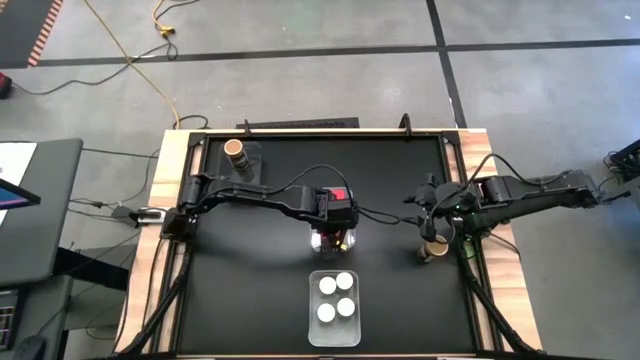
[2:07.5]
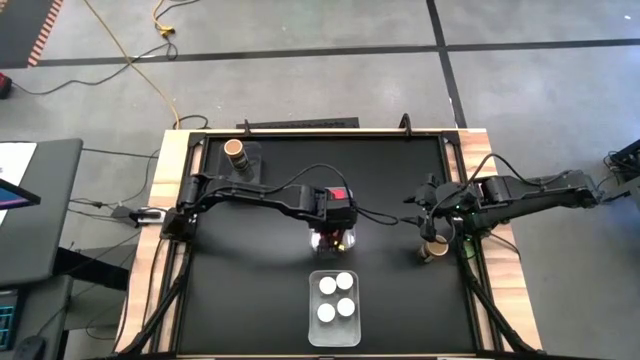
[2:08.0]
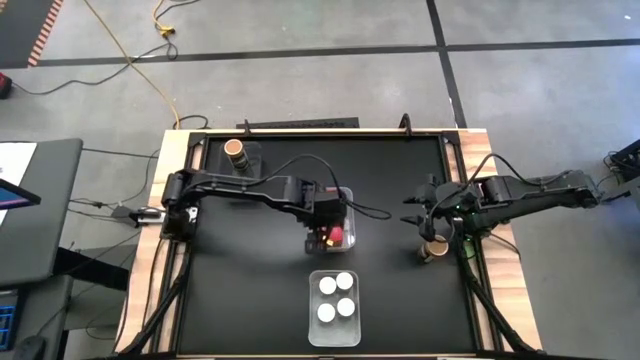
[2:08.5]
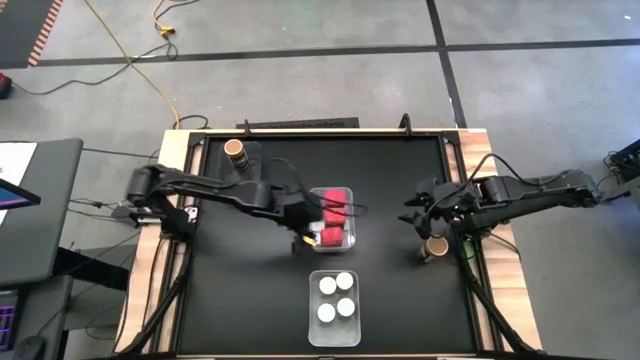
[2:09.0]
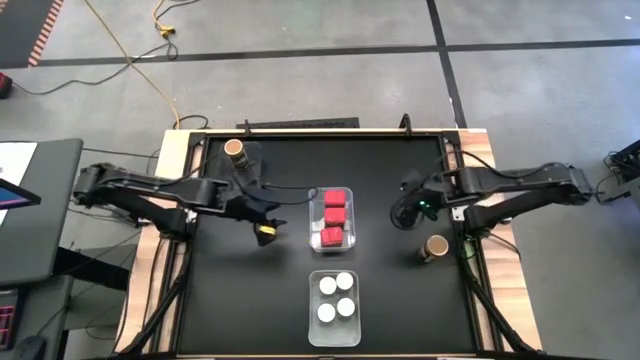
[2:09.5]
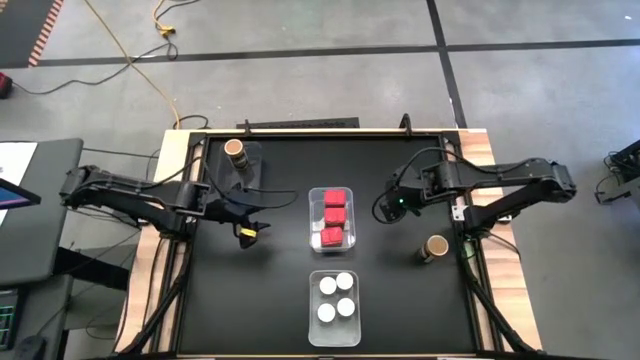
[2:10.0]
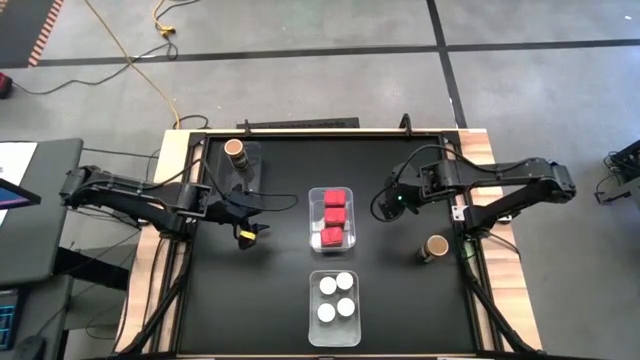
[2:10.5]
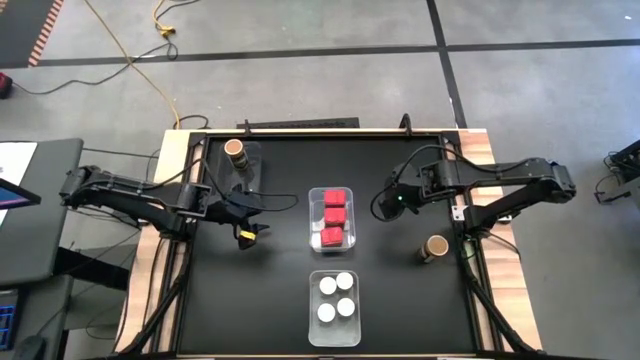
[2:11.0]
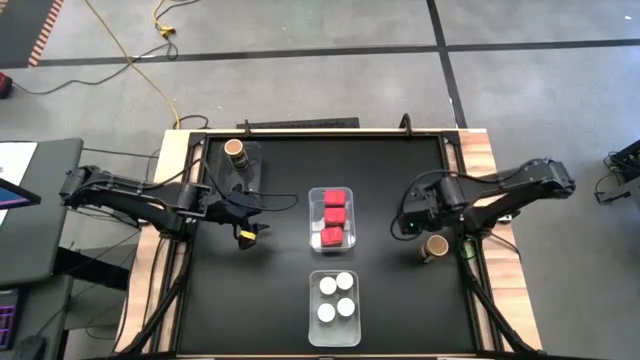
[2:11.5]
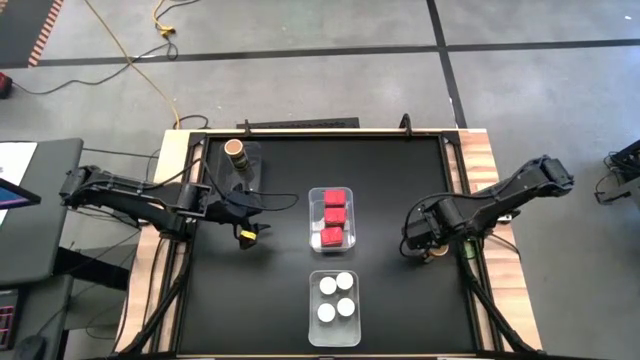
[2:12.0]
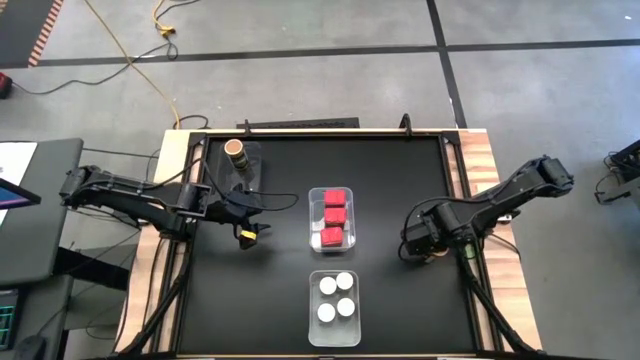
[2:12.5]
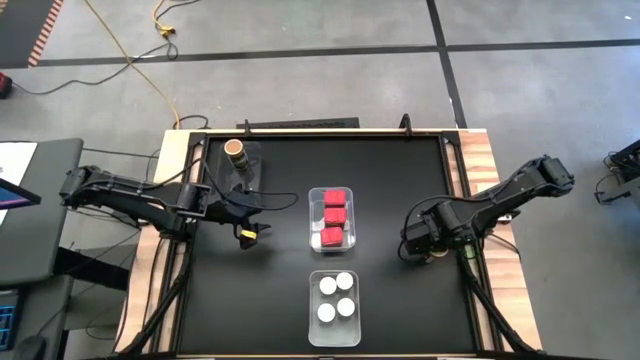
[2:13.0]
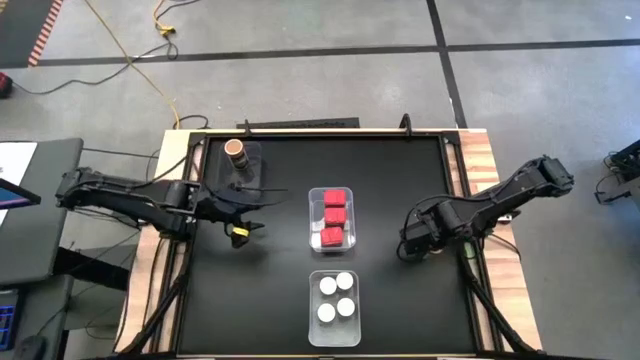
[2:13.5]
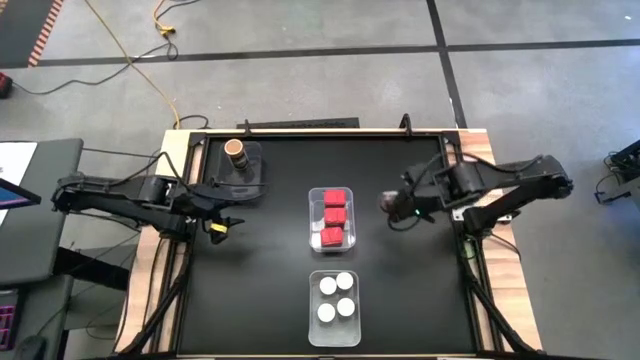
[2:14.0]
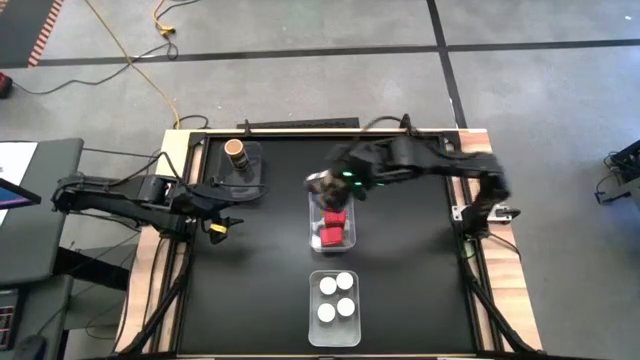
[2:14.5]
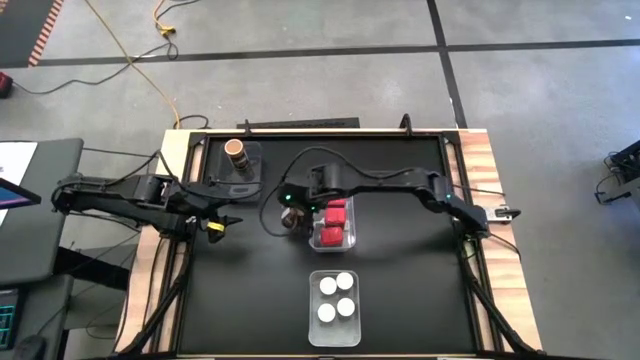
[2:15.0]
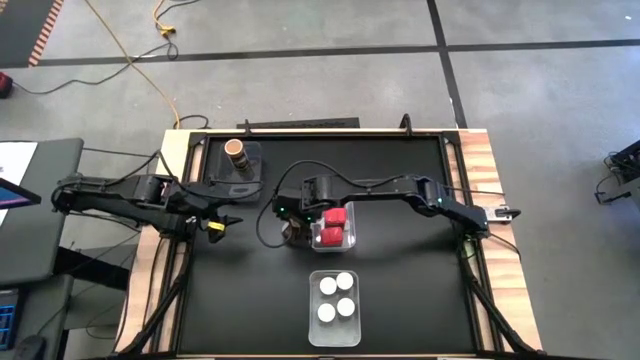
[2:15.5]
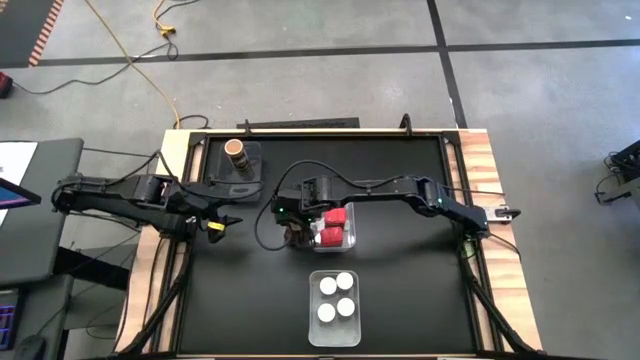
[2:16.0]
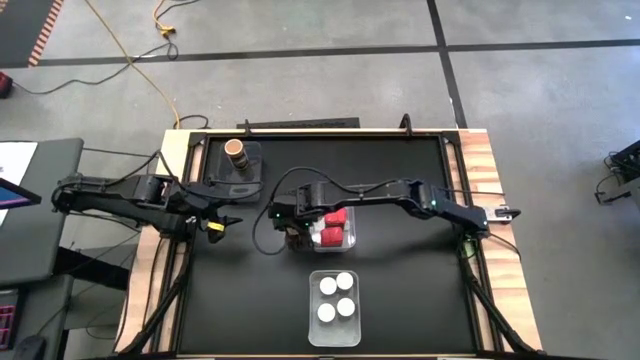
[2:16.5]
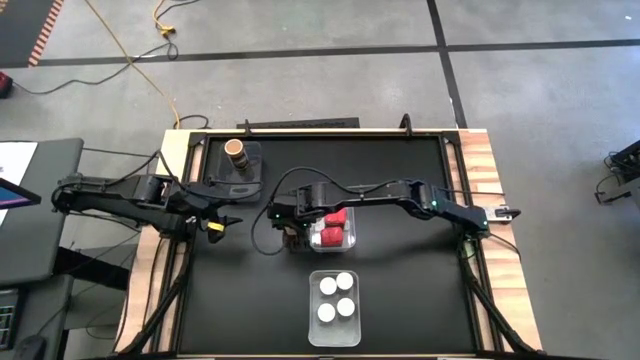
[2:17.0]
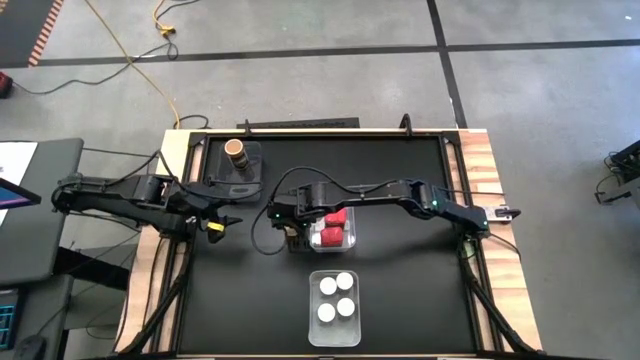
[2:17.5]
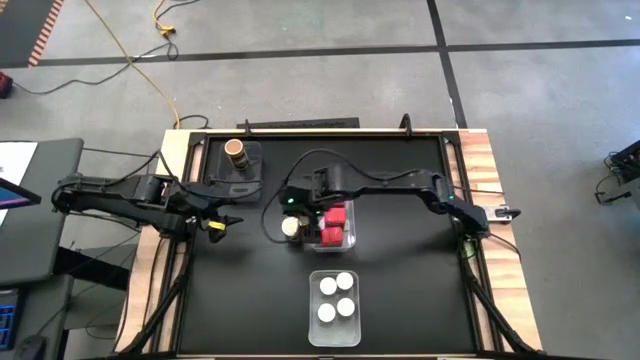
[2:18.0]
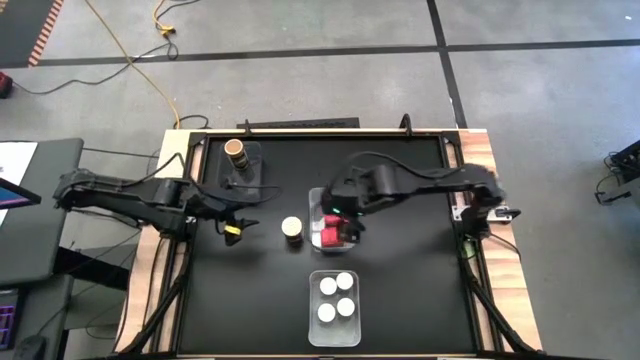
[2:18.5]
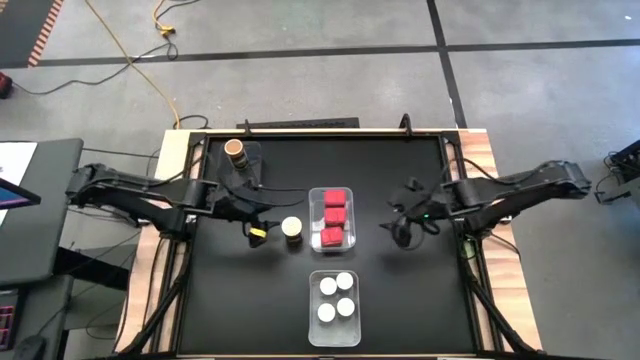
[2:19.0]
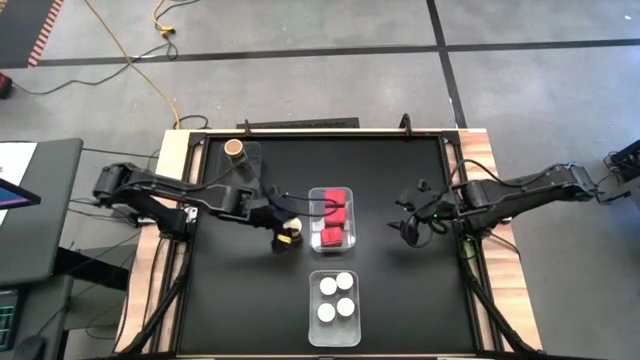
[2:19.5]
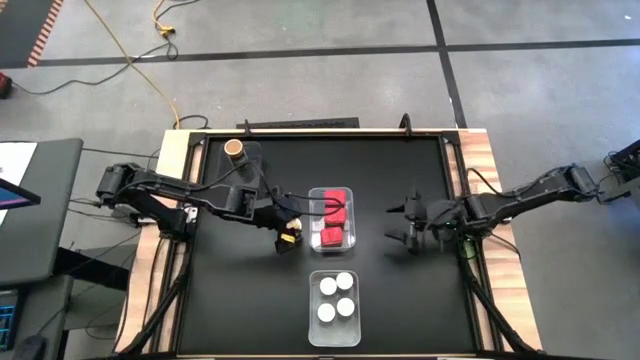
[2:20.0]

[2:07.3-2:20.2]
Task: Sort spices by type
Put the gold seasoning bottle into the black bin

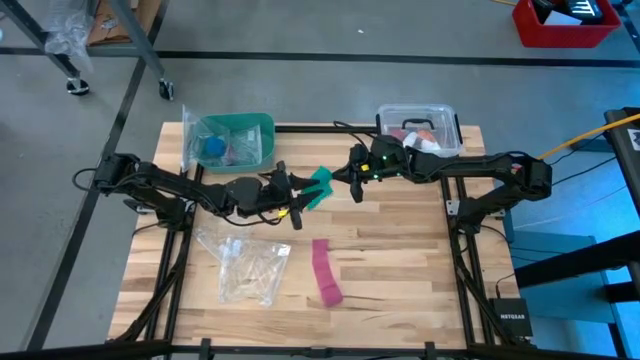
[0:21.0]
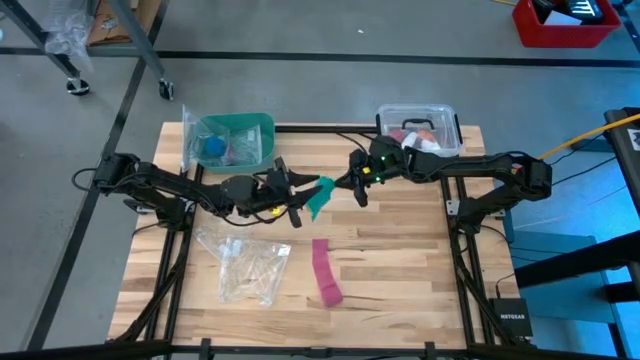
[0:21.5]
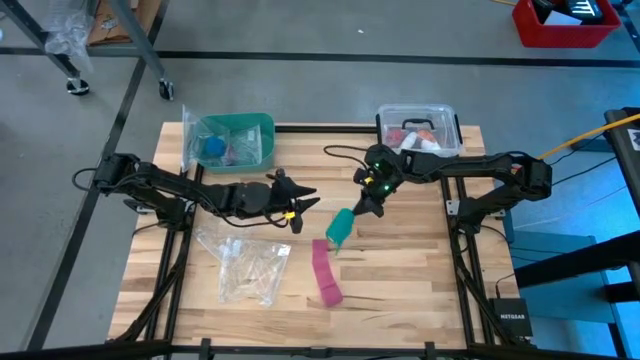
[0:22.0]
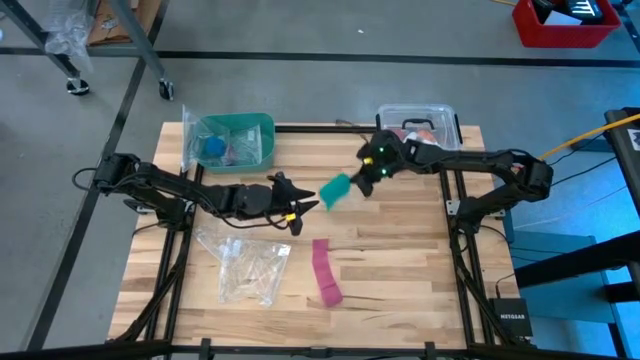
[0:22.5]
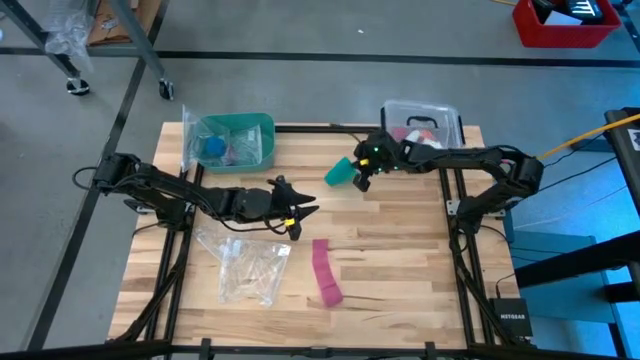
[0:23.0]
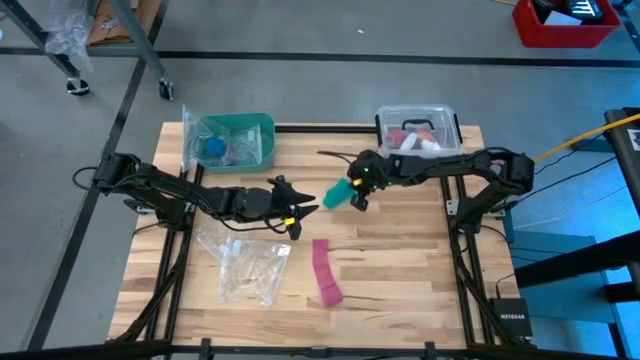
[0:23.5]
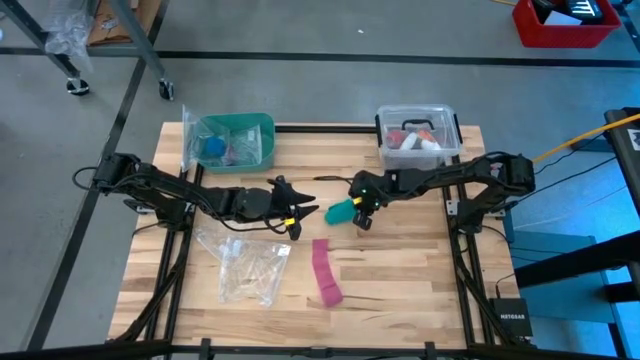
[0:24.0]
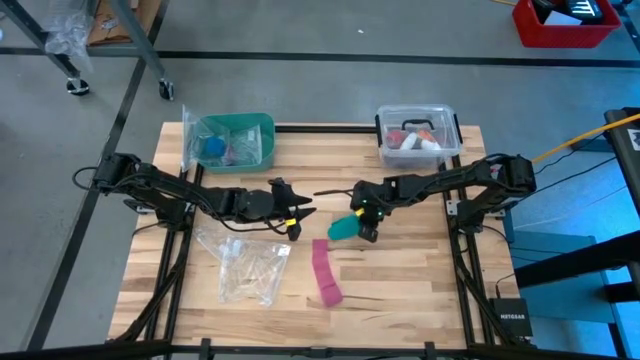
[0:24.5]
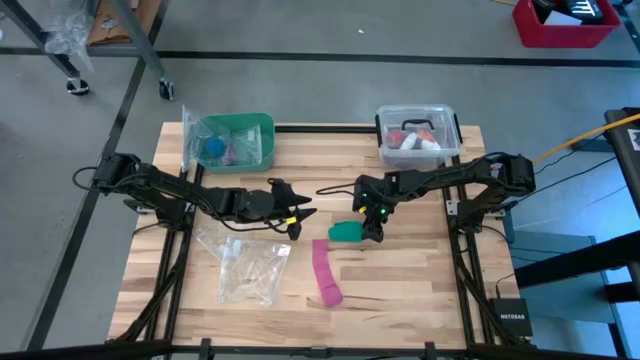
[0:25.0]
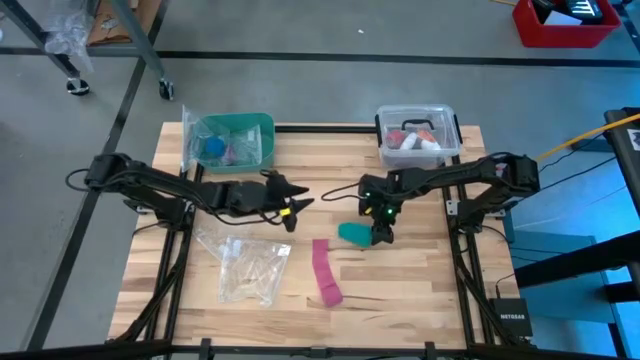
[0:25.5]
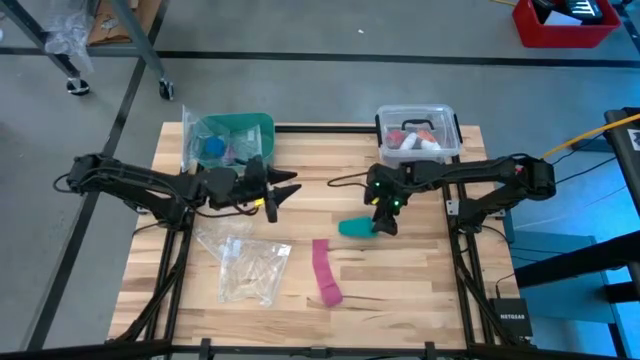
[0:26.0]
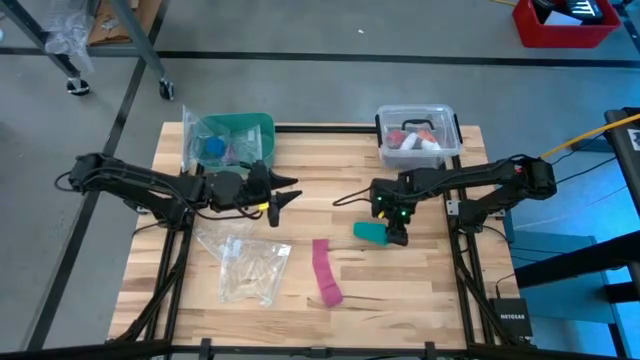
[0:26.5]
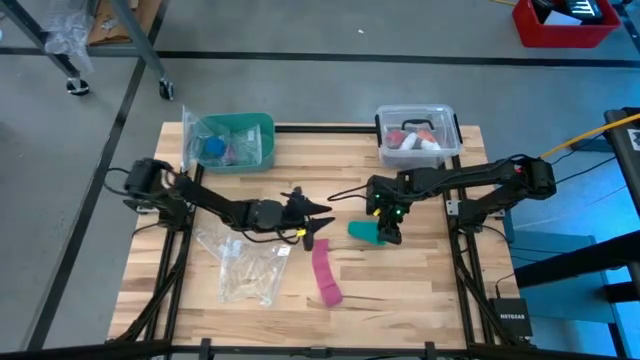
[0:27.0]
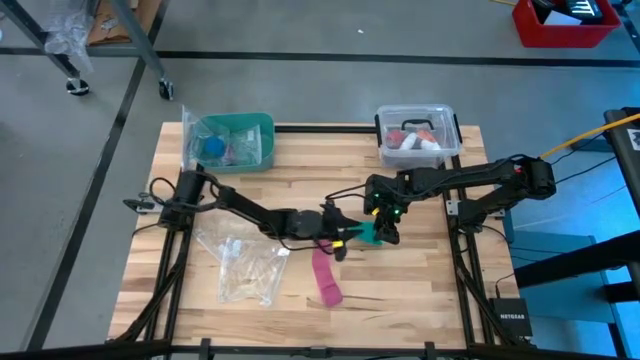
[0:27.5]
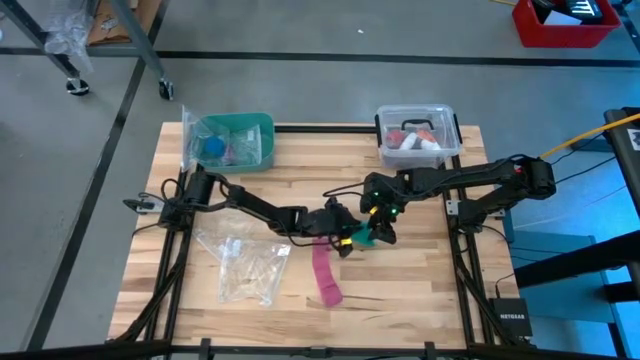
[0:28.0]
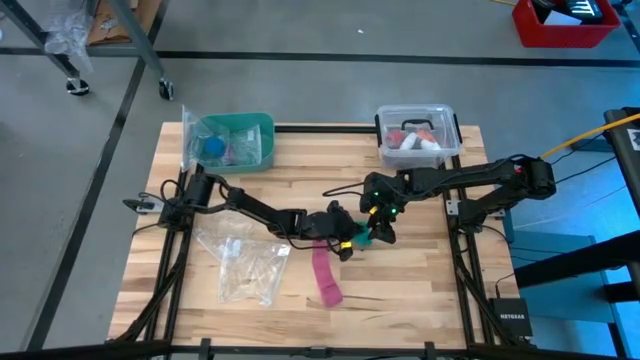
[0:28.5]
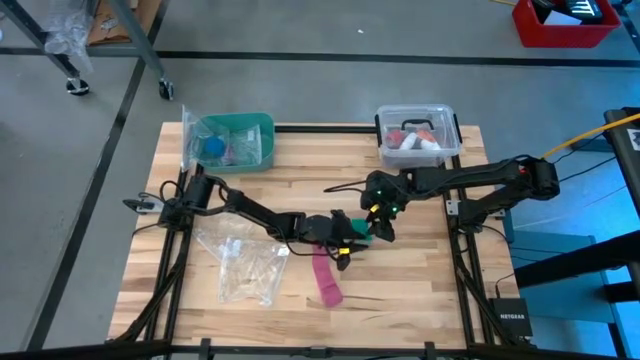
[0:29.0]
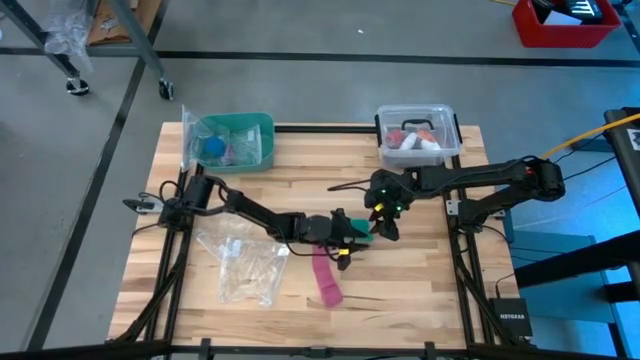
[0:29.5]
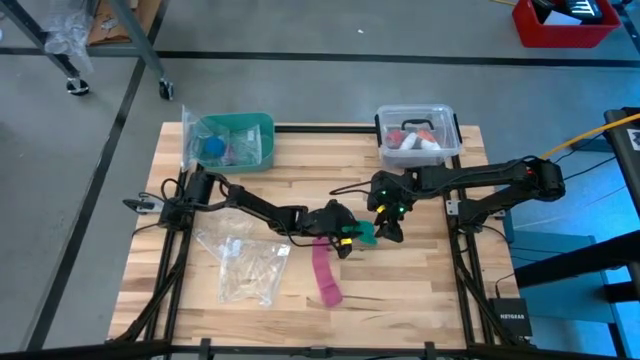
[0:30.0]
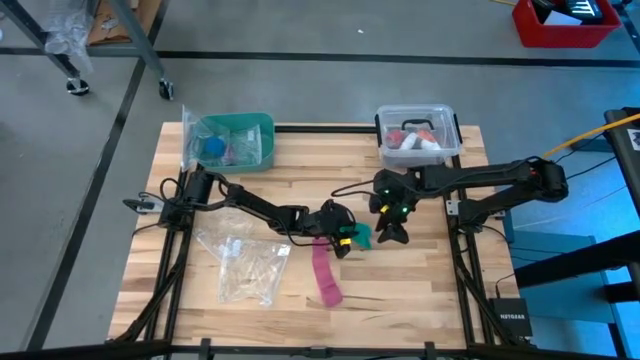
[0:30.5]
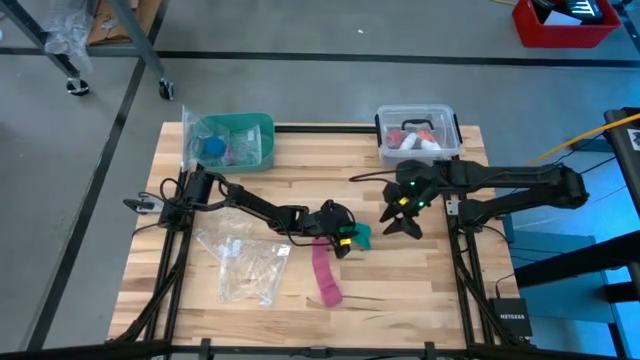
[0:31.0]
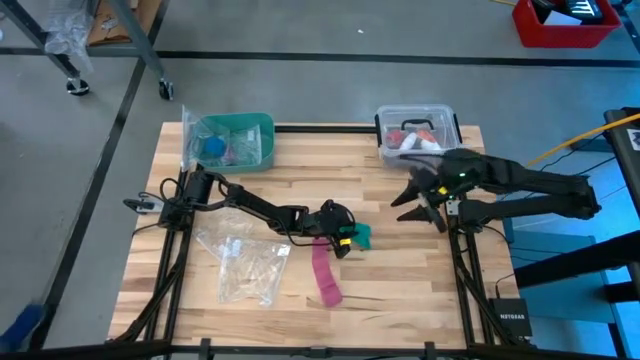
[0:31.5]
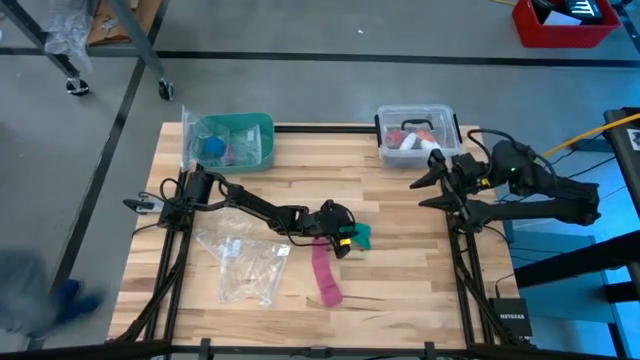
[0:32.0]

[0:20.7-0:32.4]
Task: Roll bandage
Roll the green bandage
